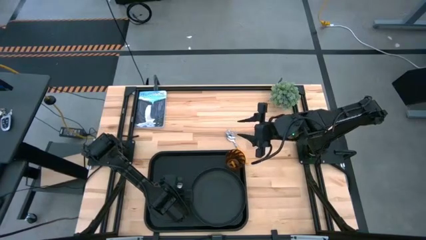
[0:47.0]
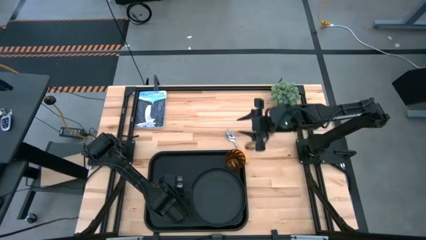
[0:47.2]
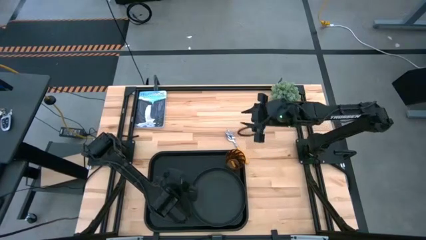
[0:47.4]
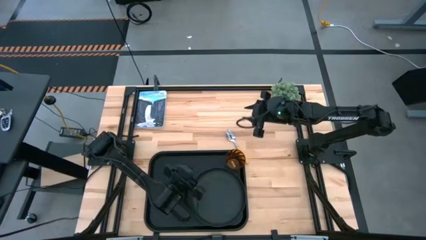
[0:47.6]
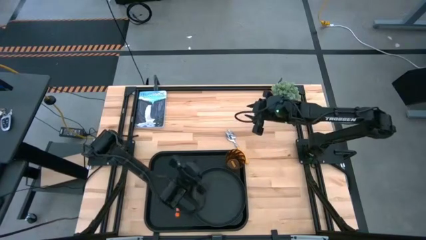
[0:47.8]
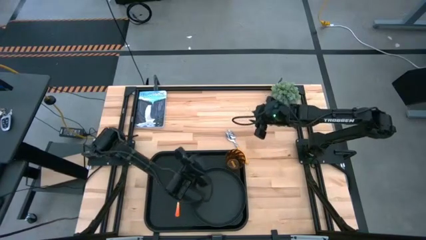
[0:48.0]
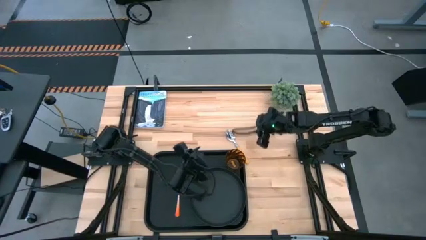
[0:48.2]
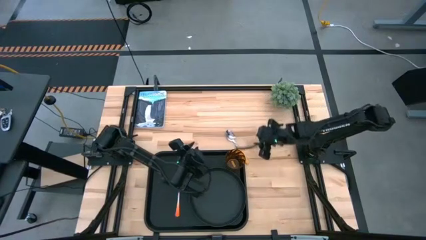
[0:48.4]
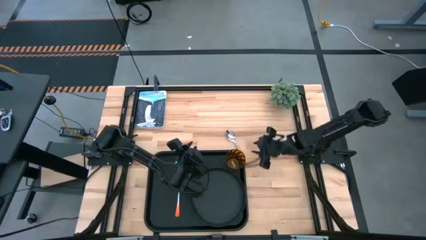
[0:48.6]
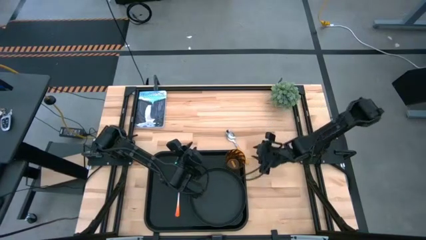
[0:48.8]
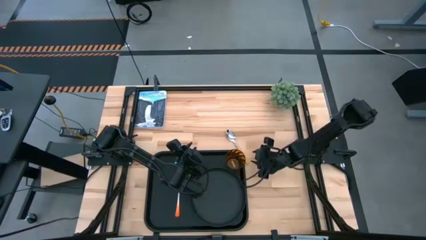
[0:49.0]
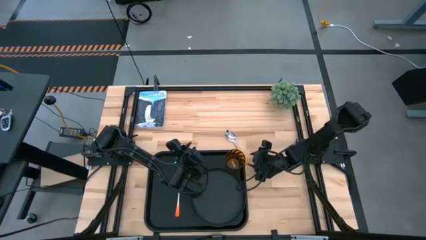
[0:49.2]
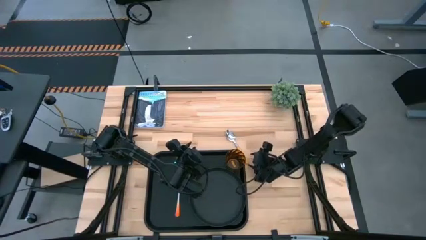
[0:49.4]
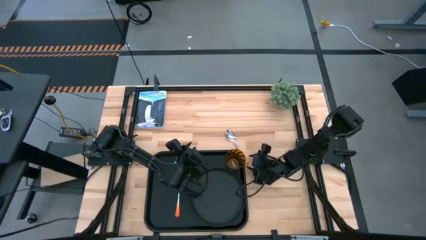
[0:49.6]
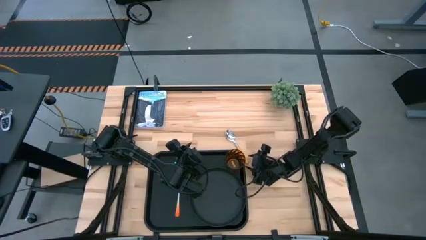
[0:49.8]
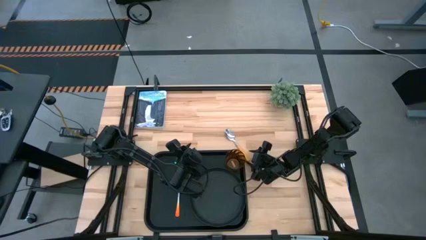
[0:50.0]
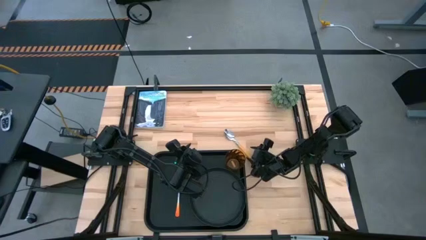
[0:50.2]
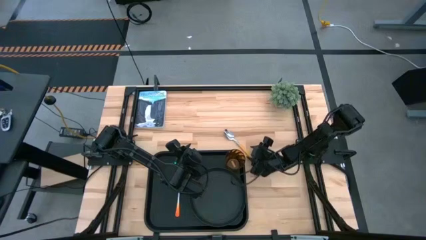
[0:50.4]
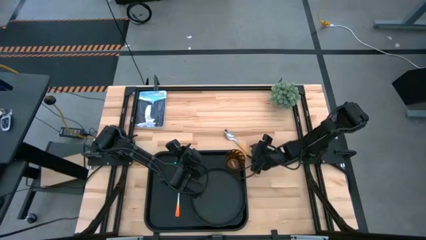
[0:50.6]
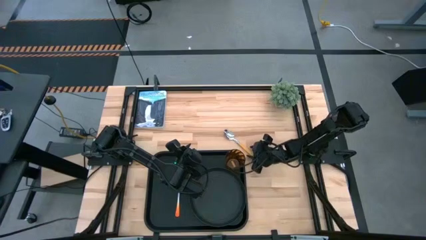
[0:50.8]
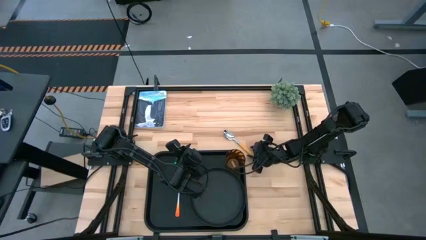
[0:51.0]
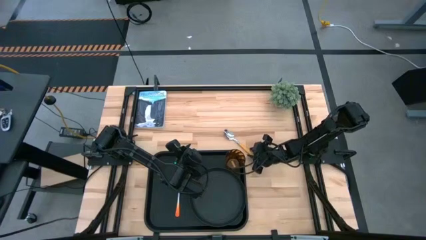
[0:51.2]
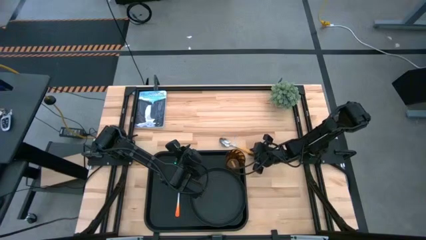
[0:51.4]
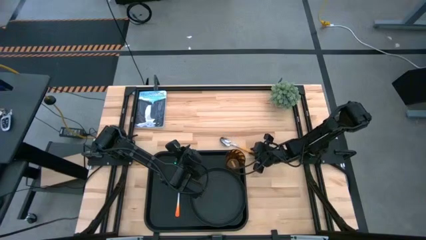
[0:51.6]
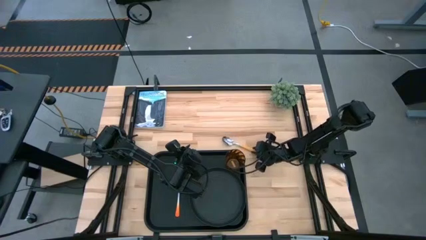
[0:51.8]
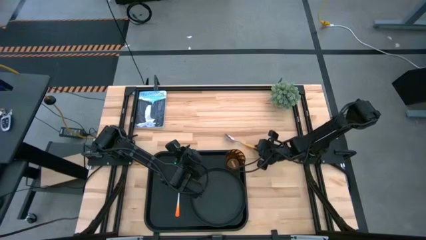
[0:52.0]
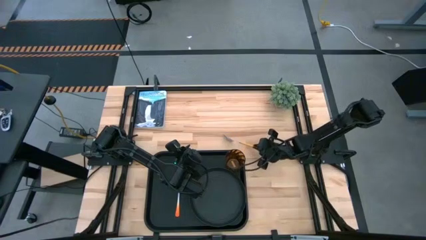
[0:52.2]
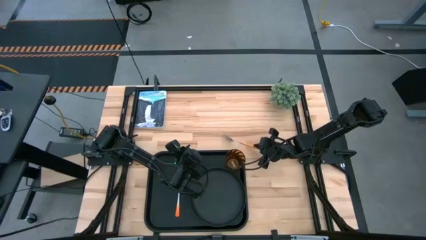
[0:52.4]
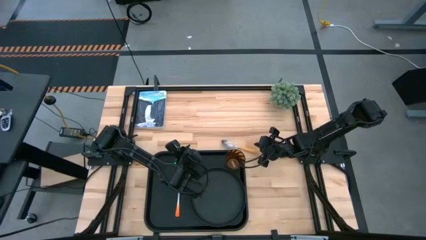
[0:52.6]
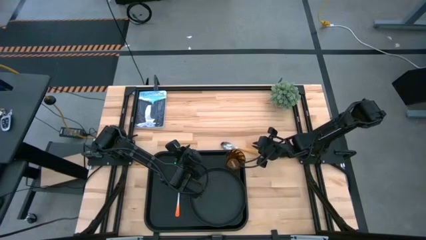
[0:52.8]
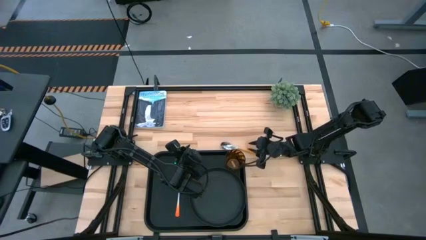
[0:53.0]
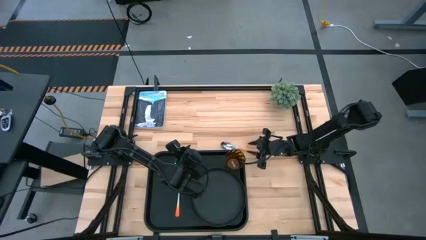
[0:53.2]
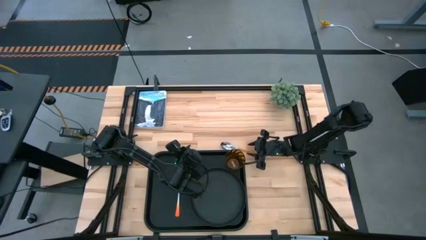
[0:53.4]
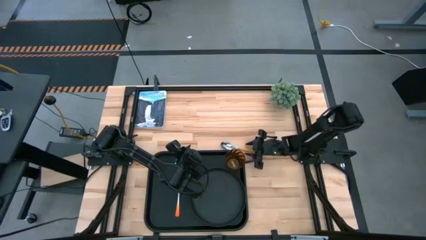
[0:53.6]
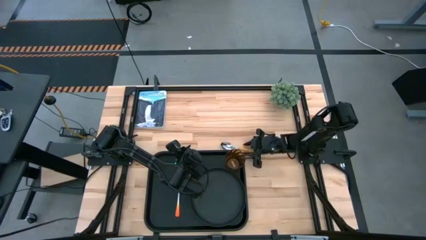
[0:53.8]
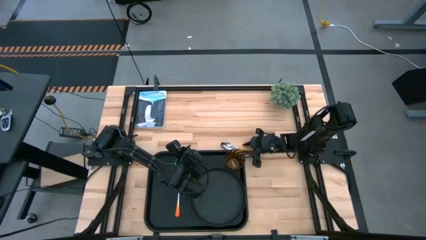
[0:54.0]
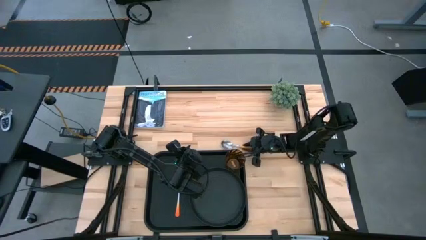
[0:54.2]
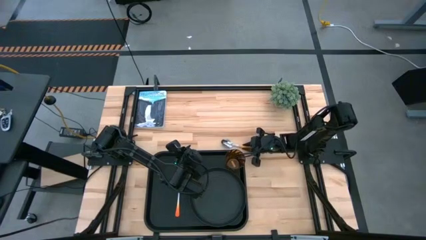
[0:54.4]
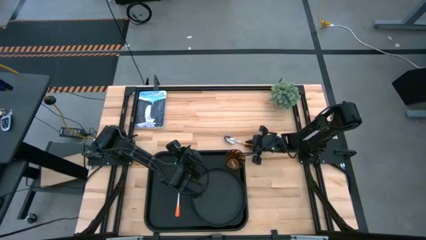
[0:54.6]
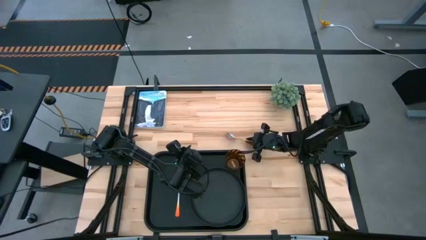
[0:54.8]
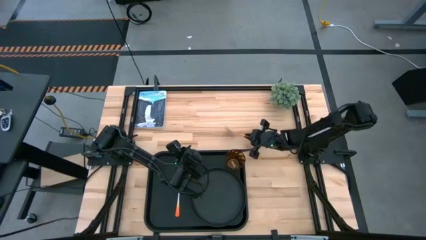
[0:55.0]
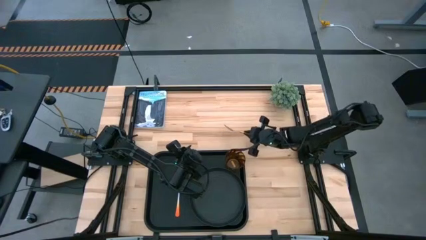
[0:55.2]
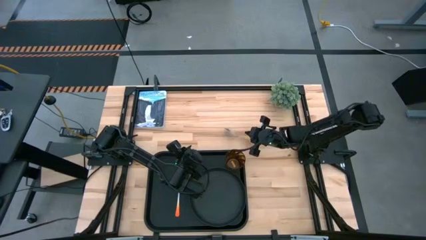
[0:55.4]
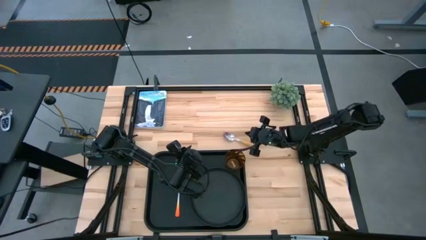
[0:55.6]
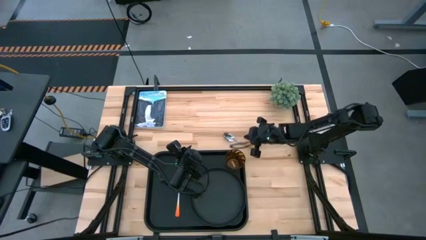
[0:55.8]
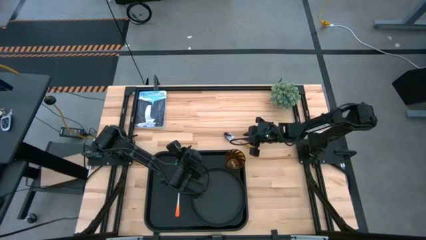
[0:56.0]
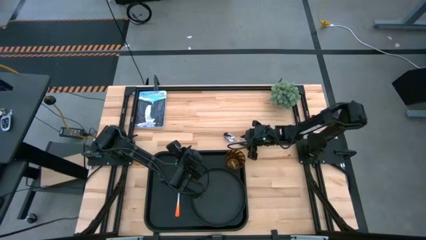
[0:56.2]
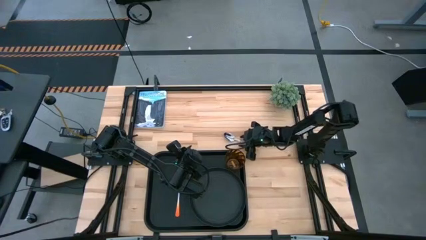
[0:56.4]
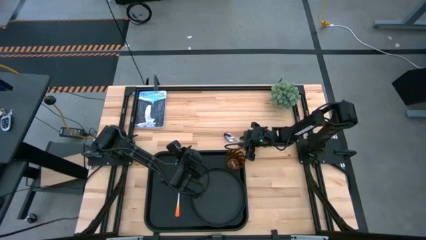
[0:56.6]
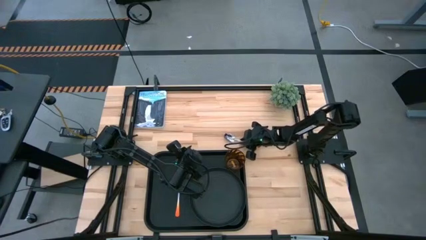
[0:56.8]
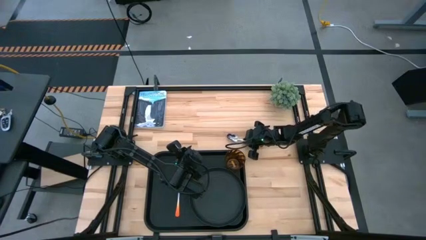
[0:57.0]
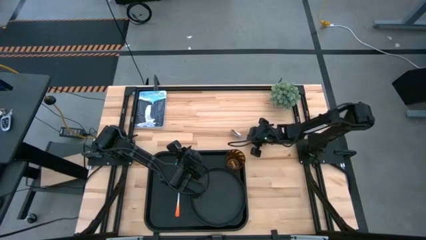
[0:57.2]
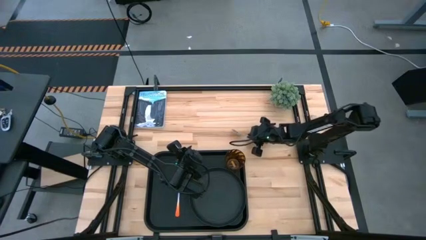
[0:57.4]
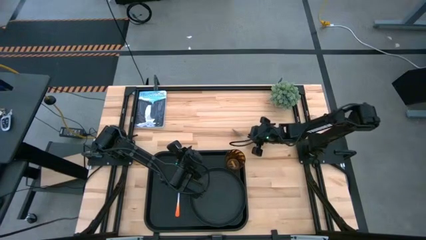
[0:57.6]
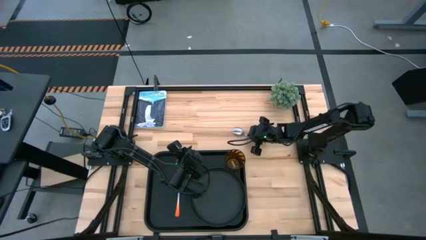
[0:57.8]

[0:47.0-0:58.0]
Task: Pick and place plate/cup/fork/spoon on tray
Put the orange spoon on the black tray to the left of the black plate
